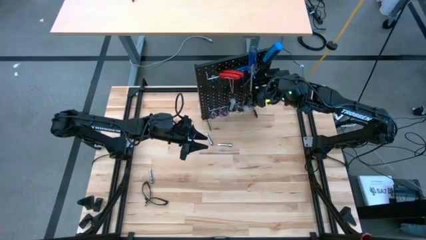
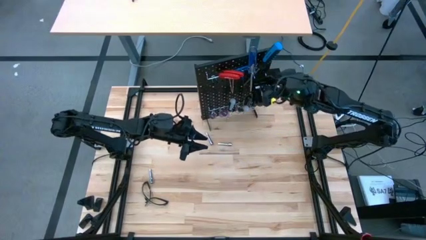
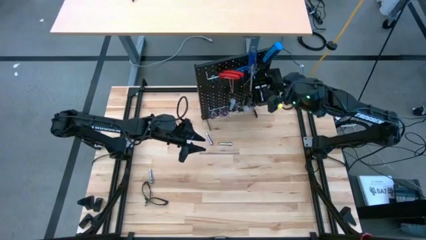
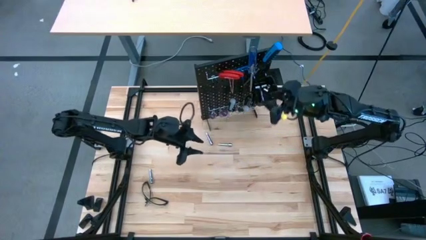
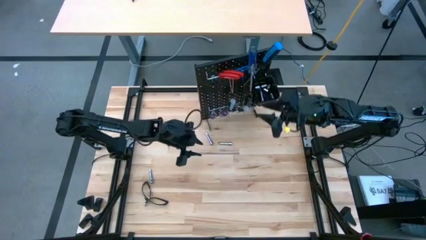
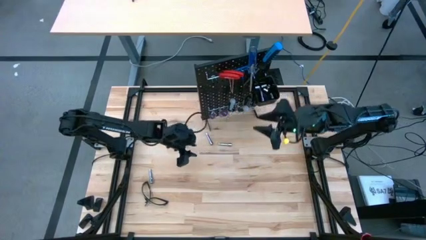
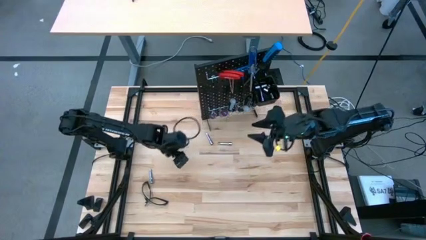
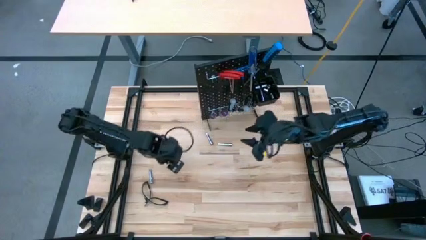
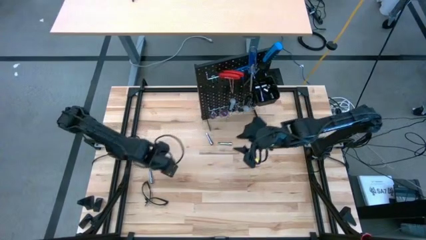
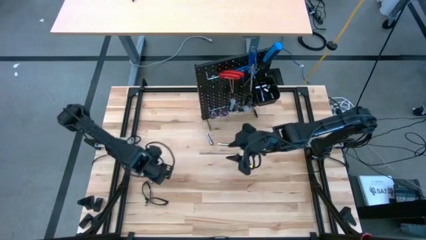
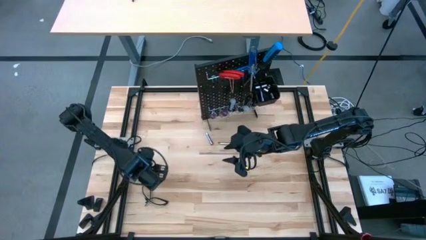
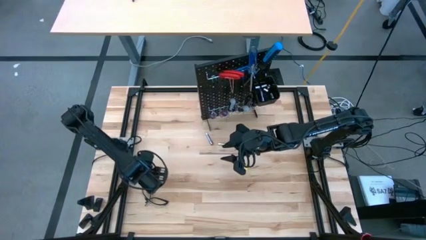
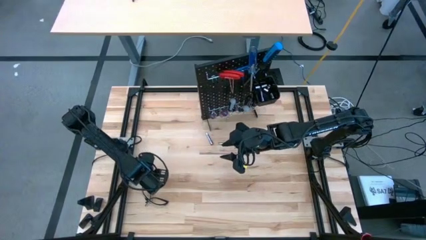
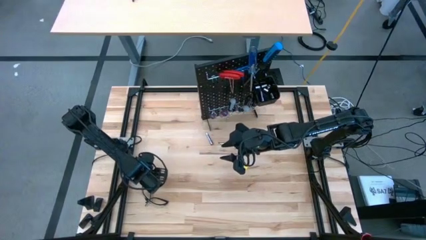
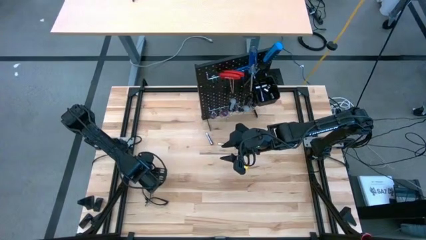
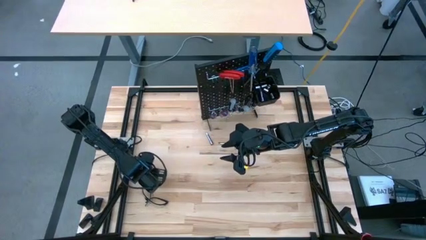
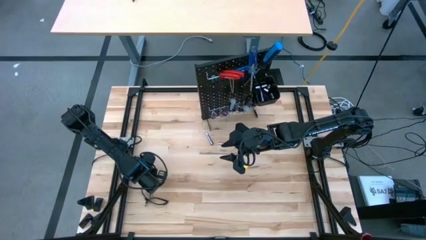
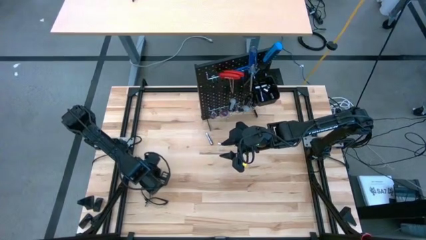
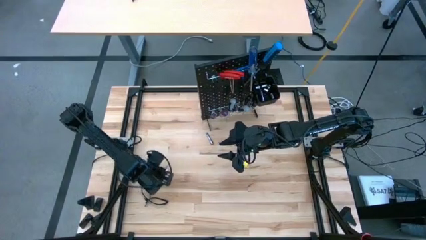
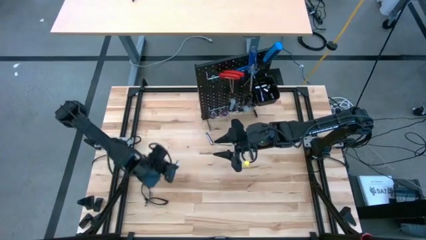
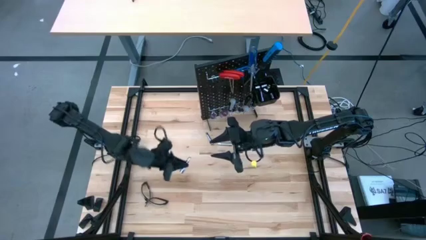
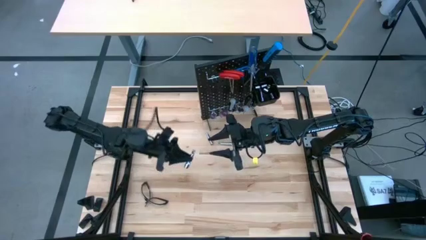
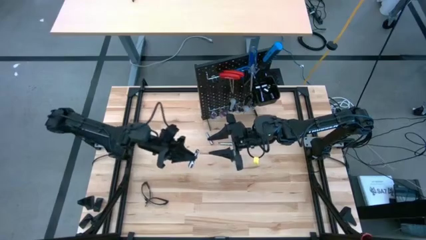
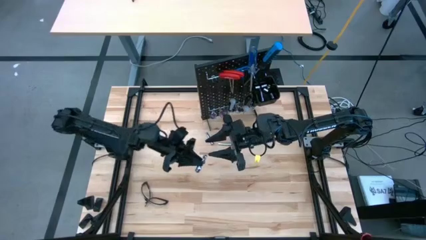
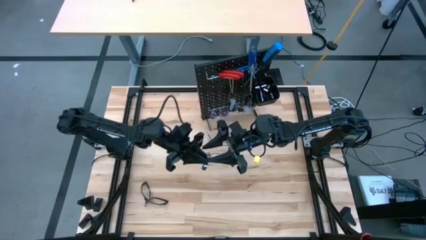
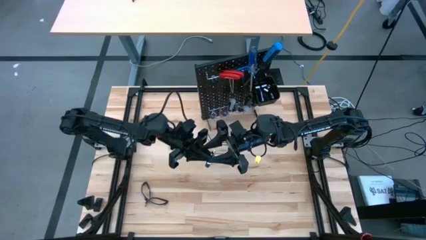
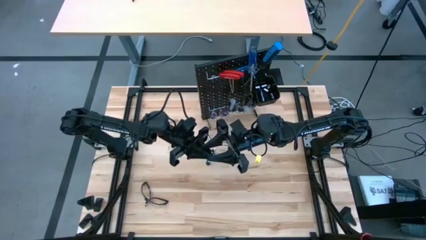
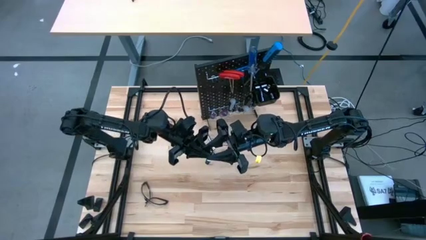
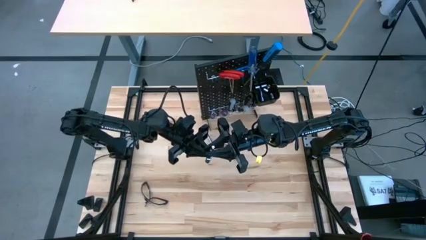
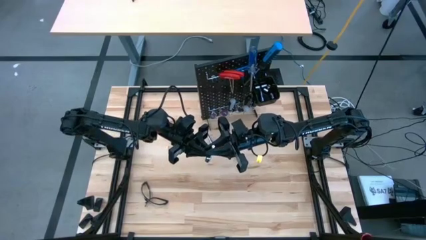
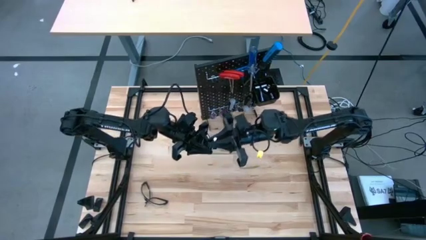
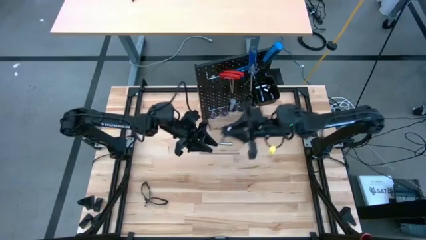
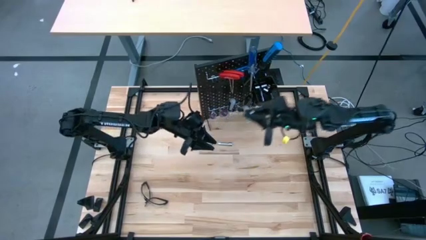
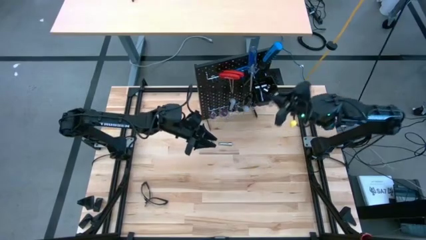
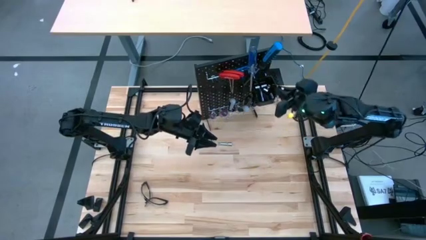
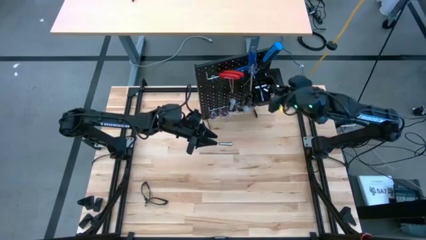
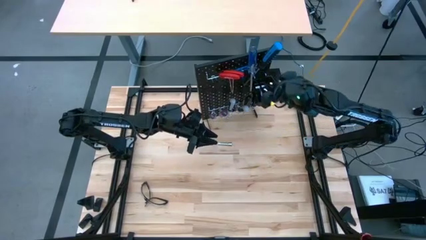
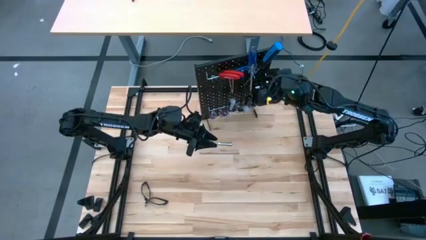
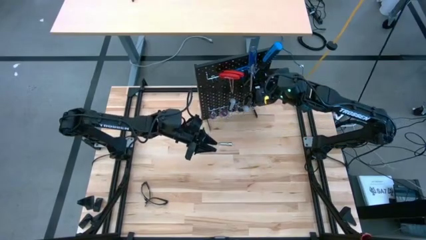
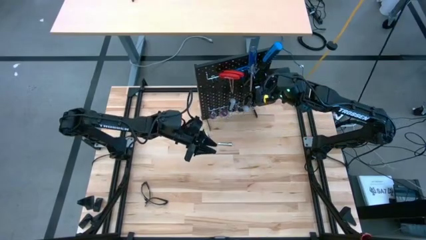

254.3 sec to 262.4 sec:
Task: Hang tools onto peg board
Put the silver extension bar into the black bin on the pegboard

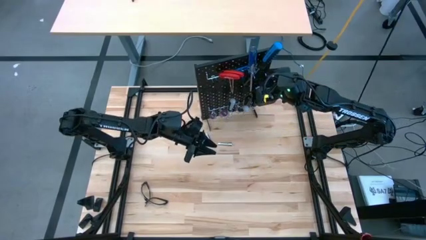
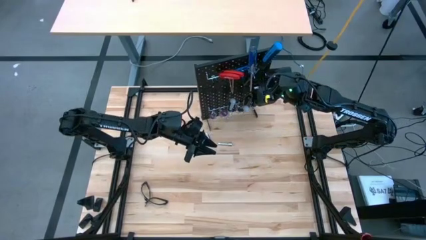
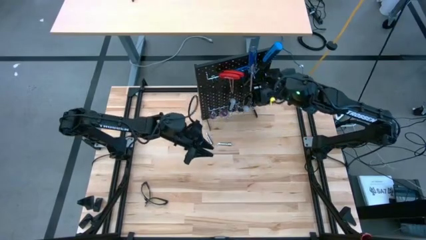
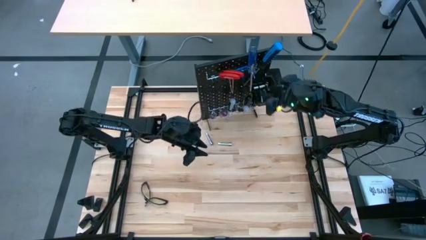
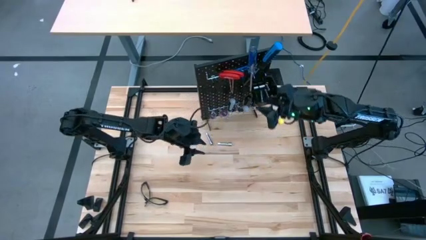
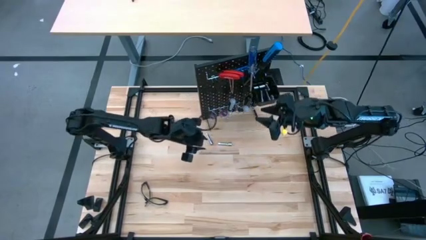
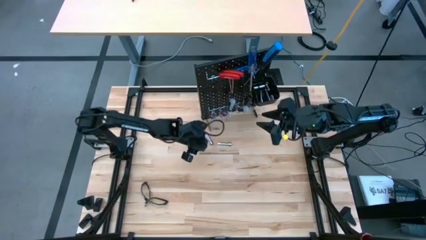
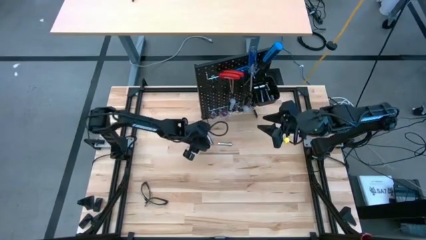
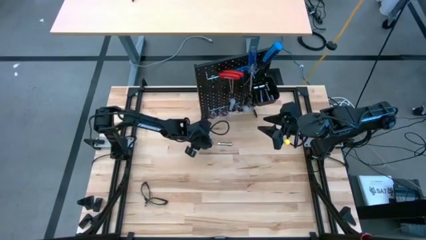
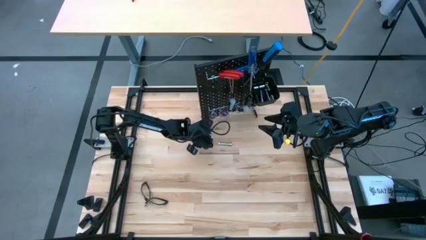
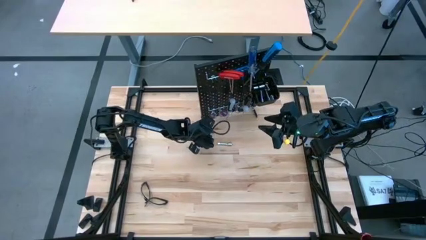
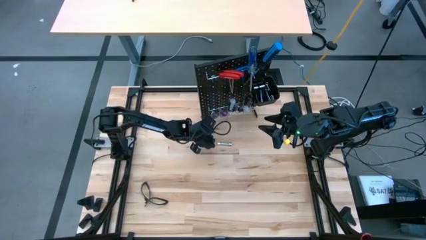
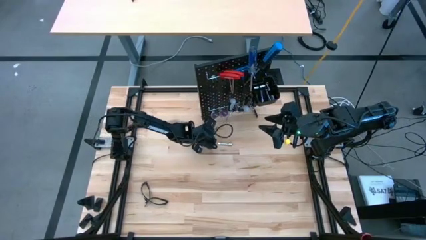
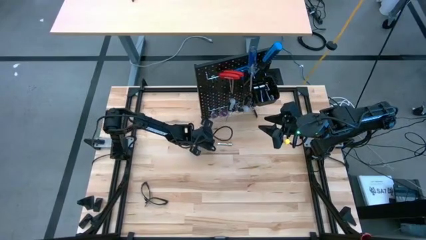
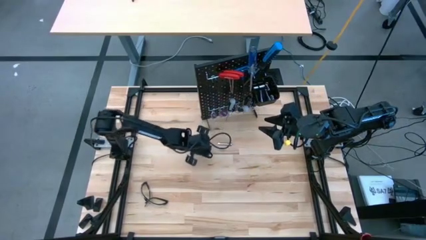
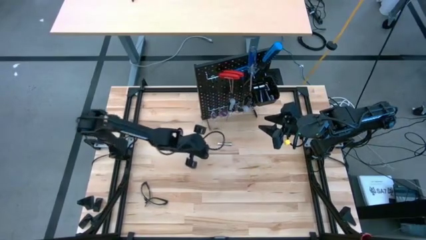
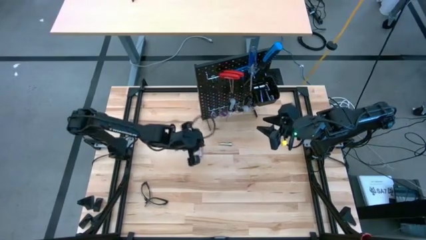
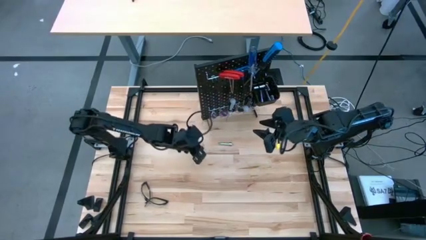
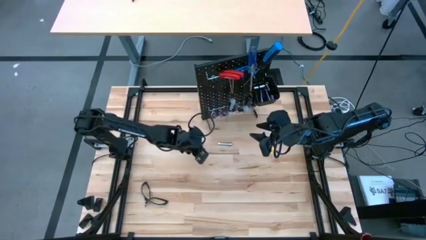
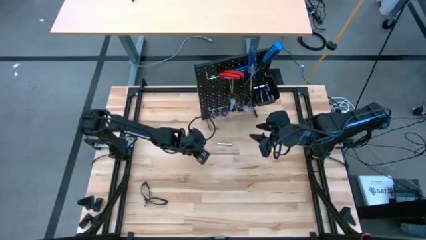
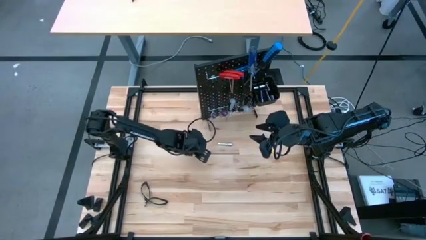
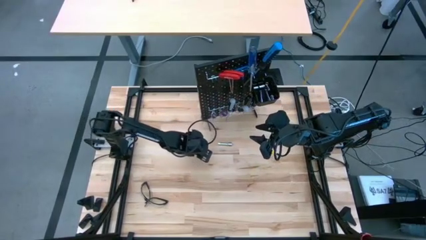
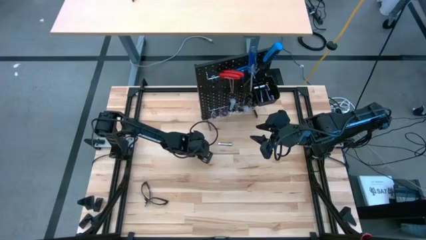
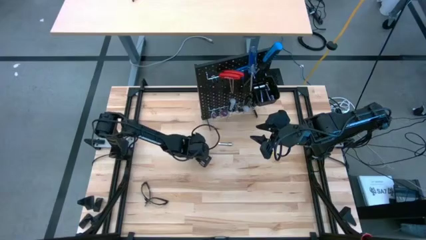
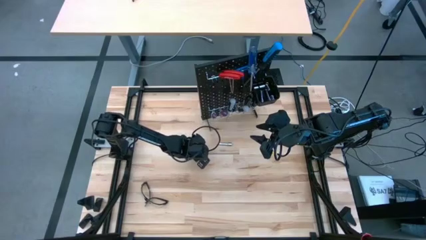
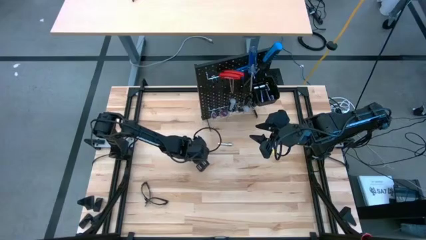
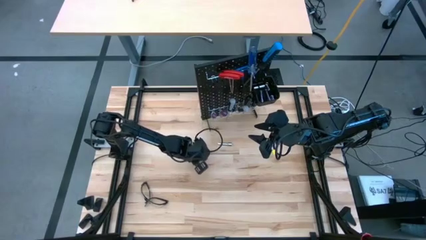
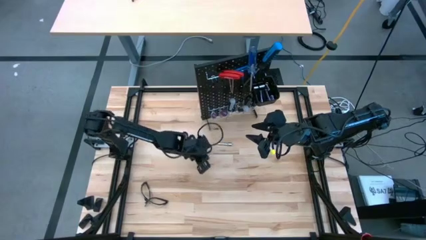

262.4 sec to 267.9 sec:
Put the silver extension bar into the black bin on the pegboard

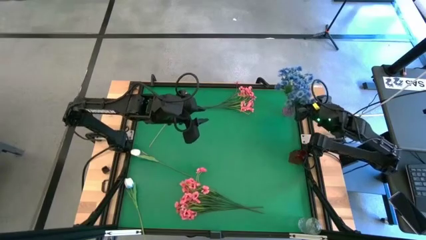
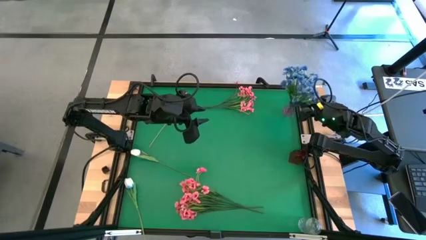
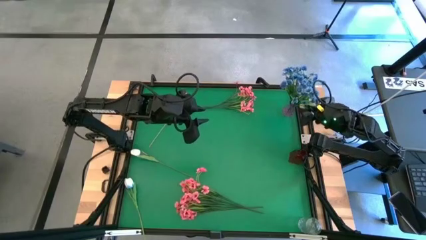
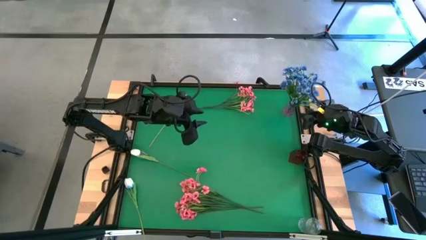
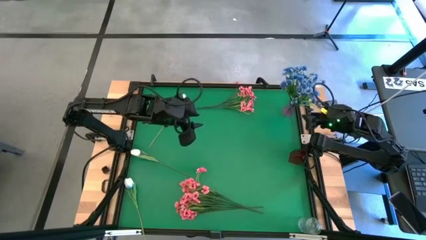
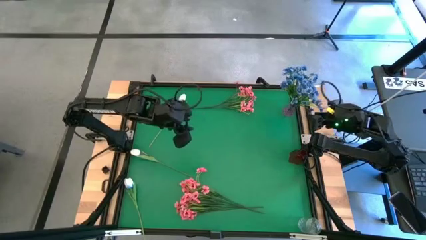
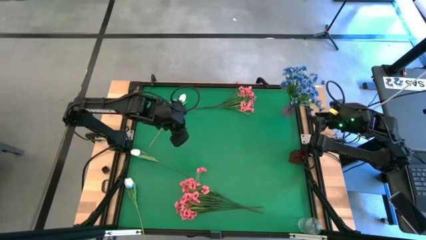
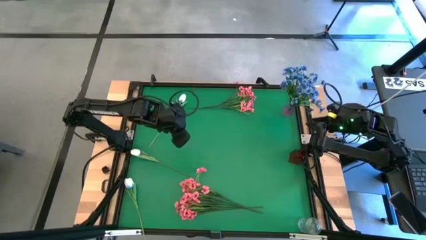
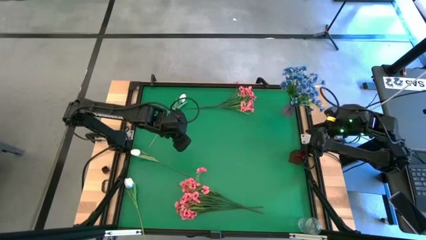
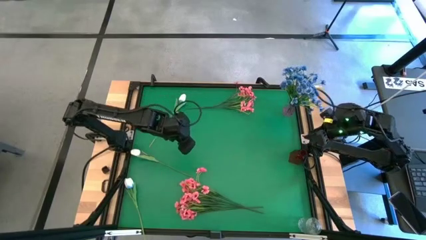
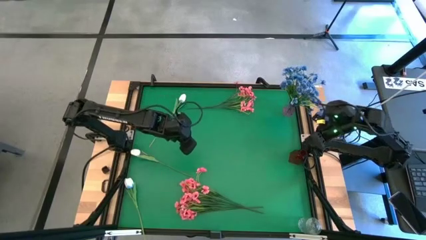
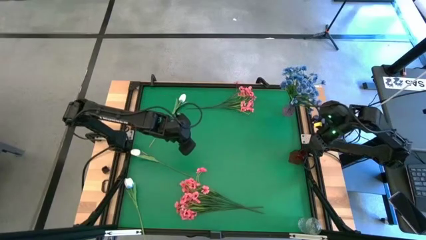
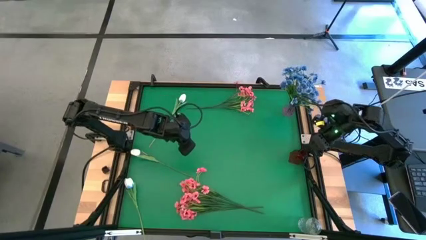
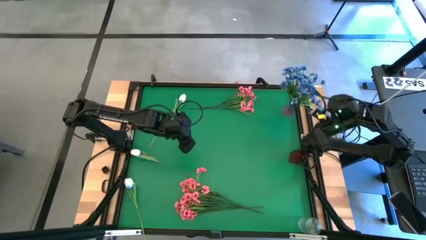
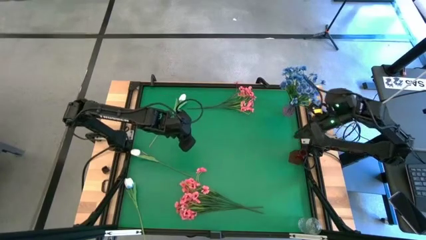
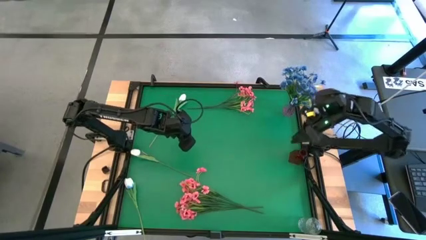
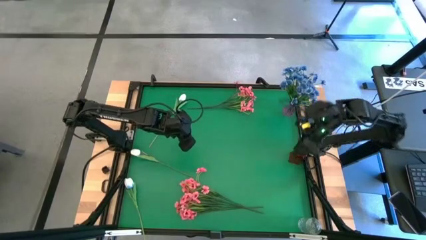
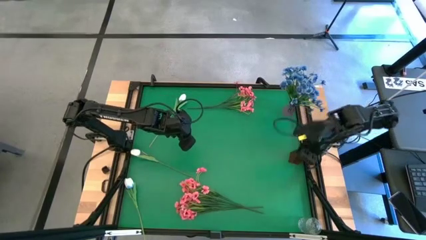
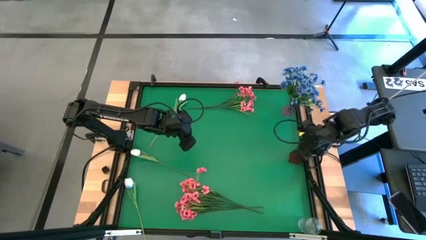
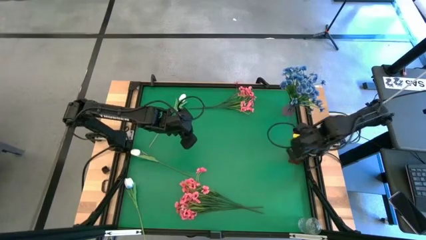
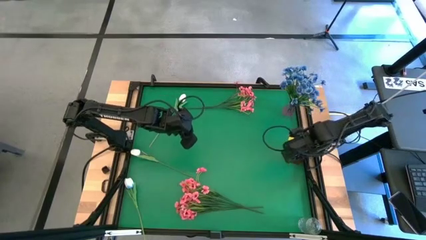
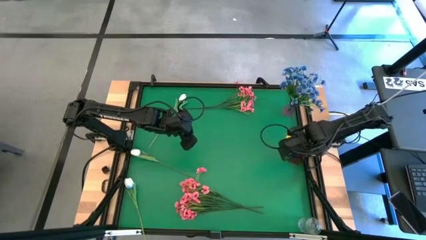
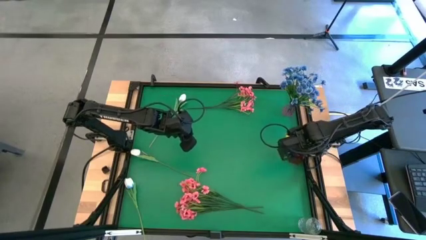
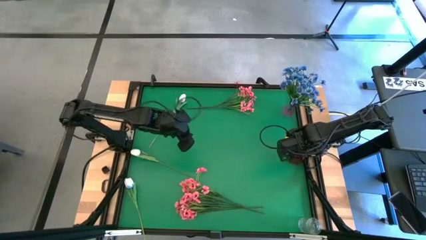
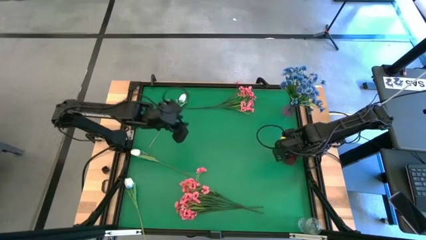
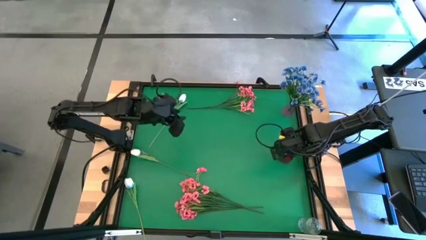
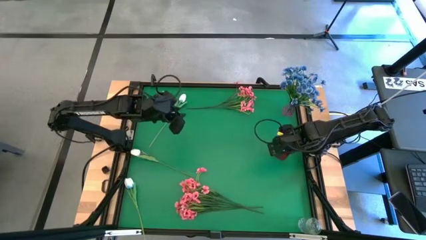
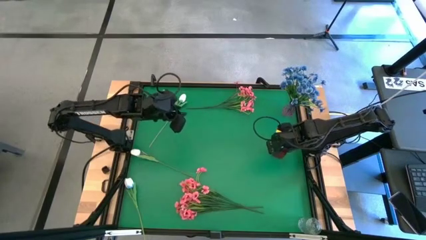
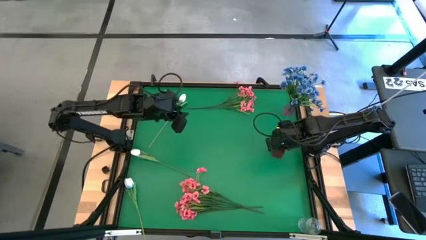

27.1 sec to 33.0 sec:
Task: Sort flowers into vase by color
Adjust the red vase
